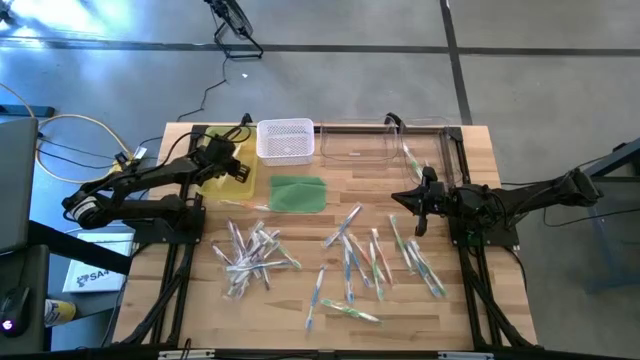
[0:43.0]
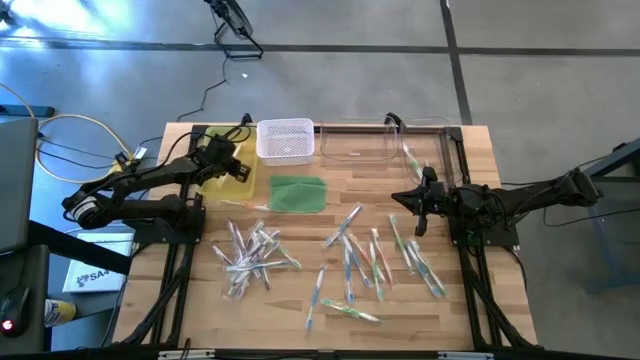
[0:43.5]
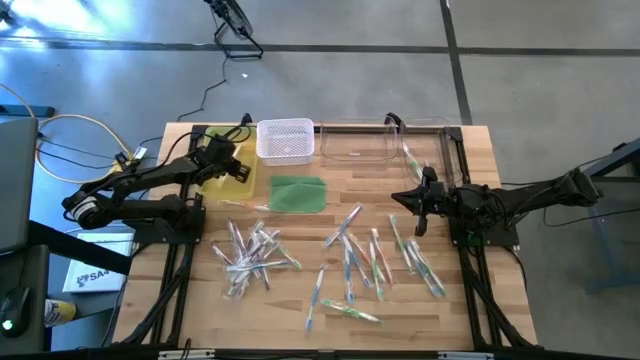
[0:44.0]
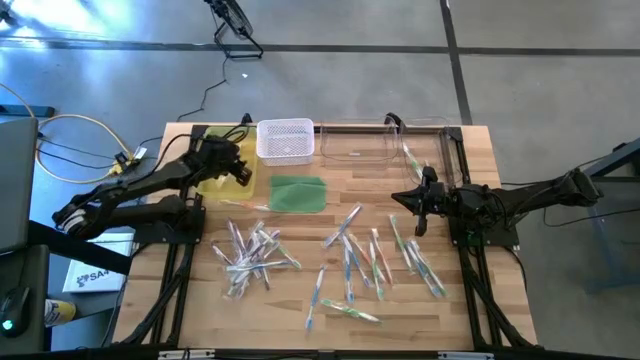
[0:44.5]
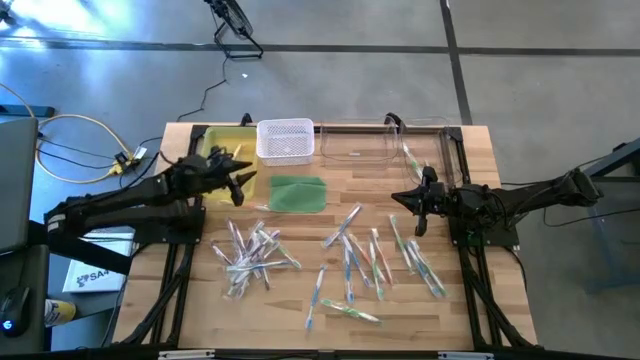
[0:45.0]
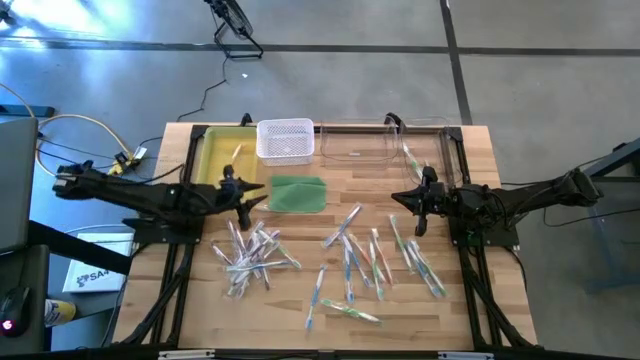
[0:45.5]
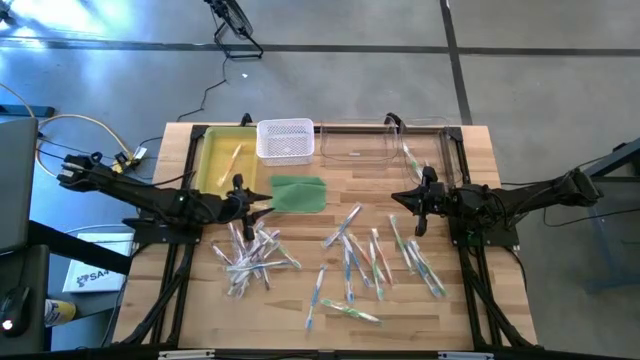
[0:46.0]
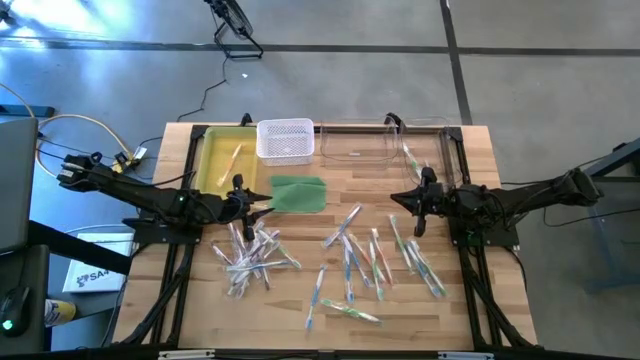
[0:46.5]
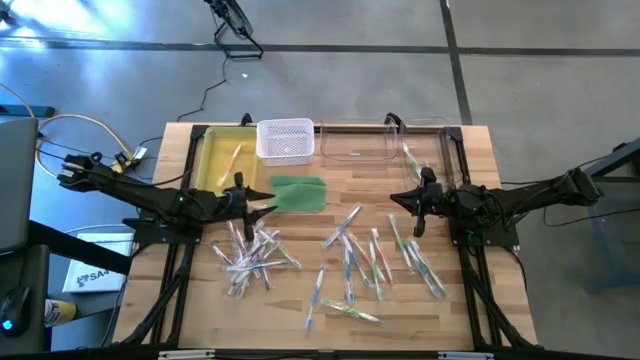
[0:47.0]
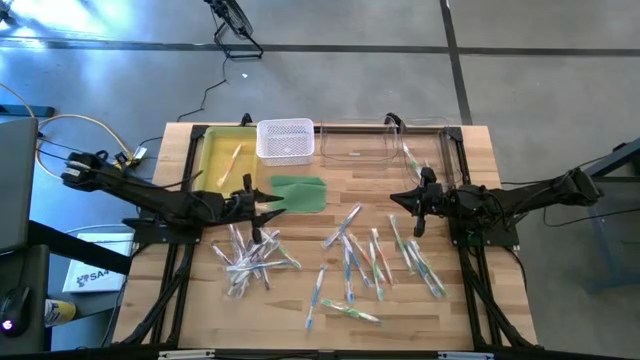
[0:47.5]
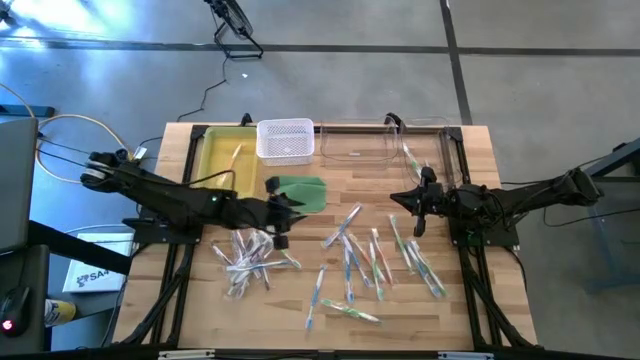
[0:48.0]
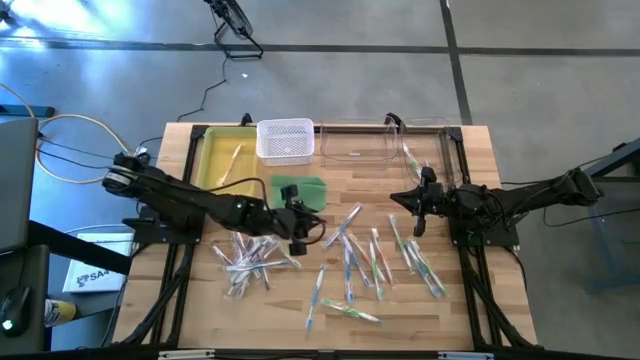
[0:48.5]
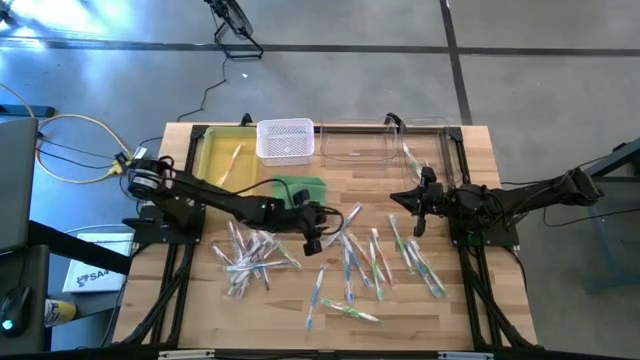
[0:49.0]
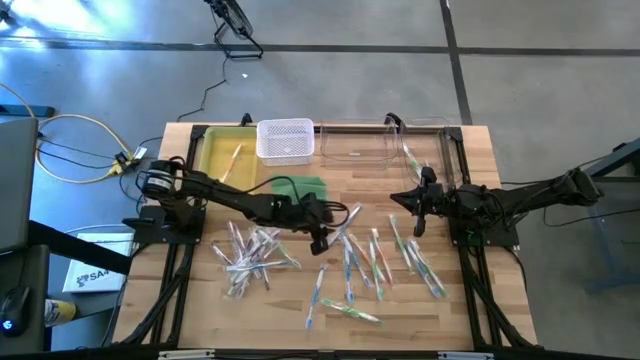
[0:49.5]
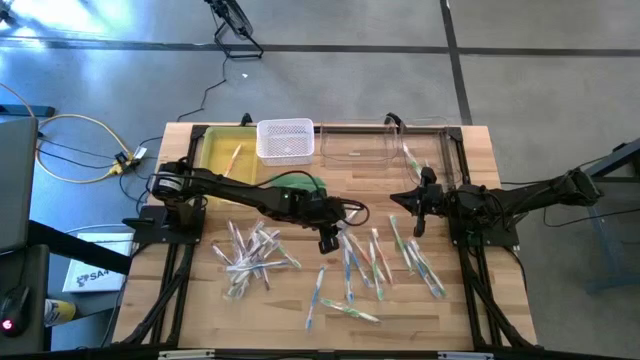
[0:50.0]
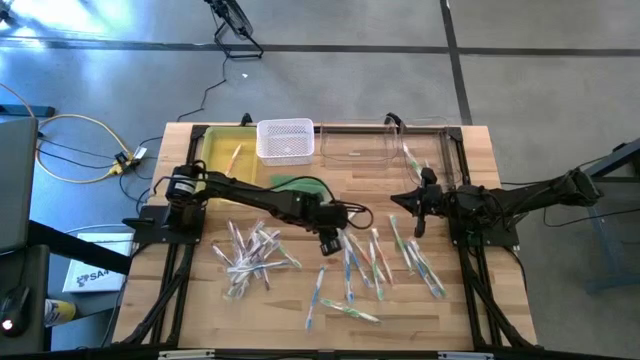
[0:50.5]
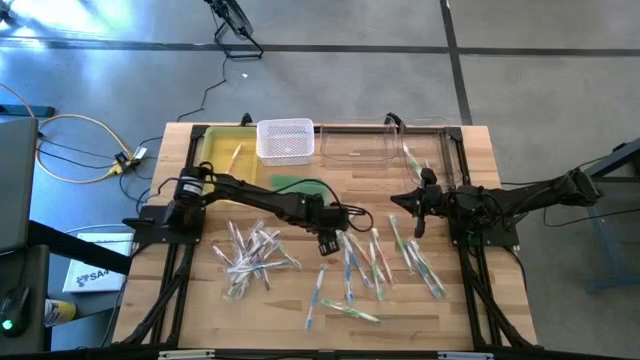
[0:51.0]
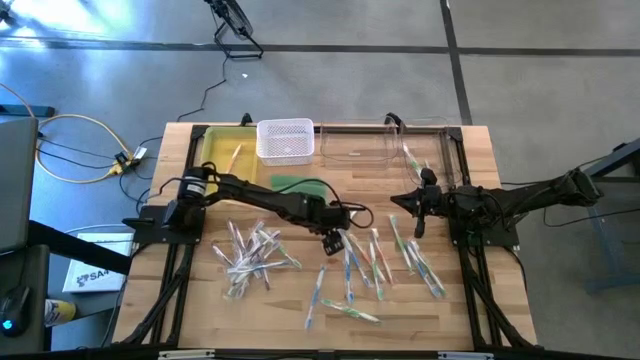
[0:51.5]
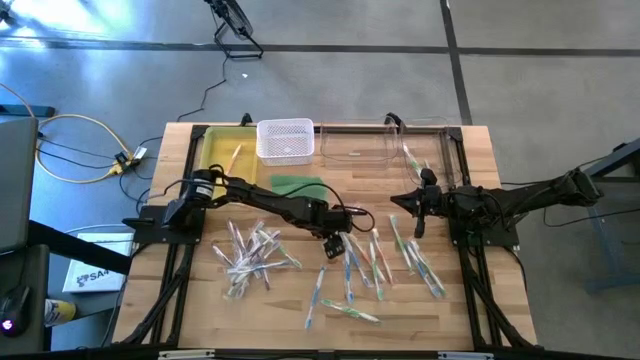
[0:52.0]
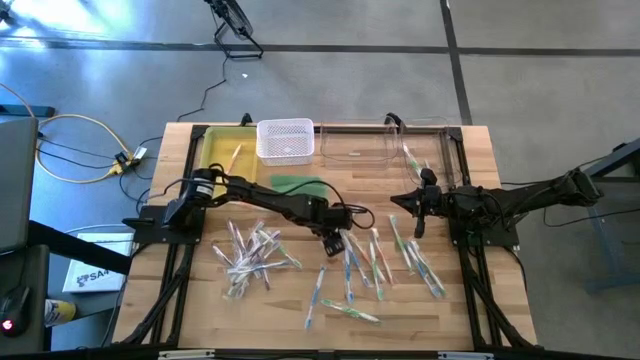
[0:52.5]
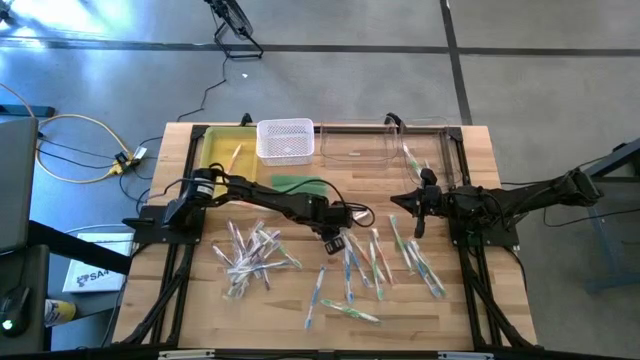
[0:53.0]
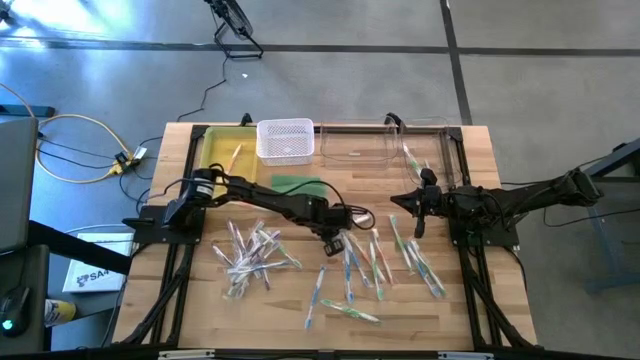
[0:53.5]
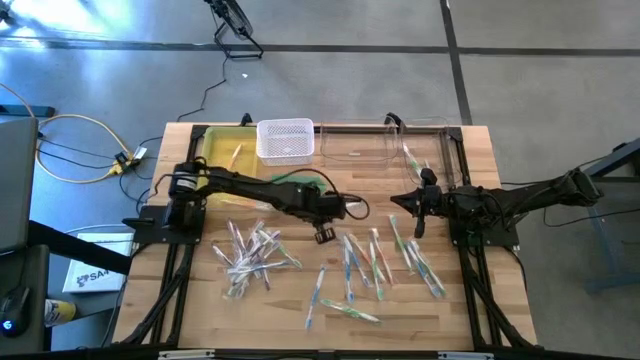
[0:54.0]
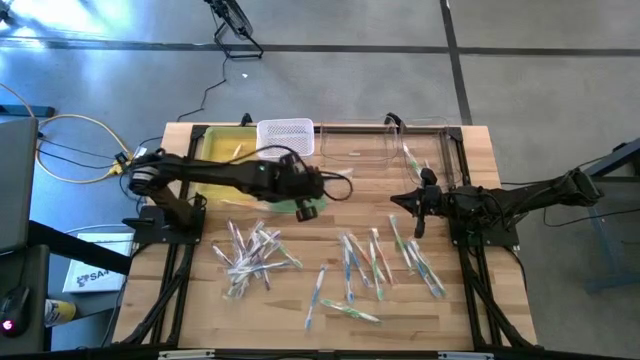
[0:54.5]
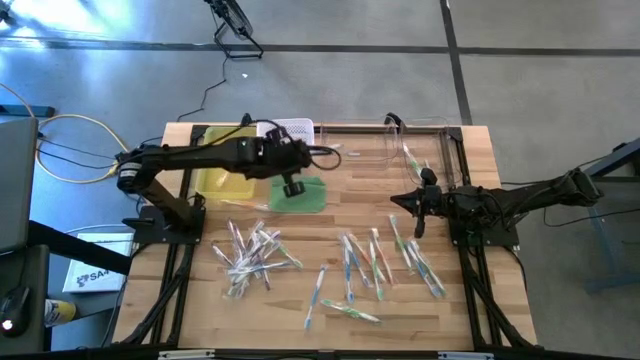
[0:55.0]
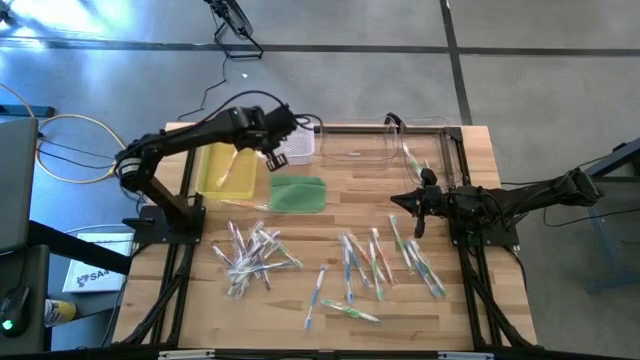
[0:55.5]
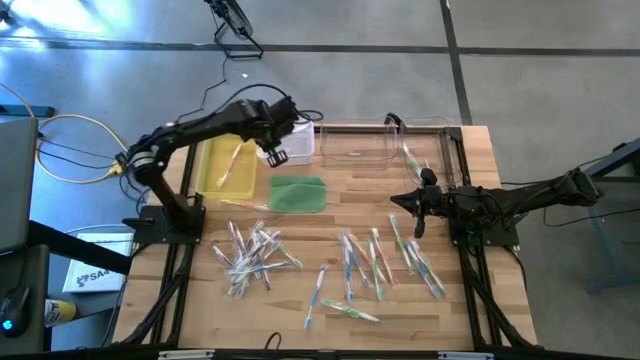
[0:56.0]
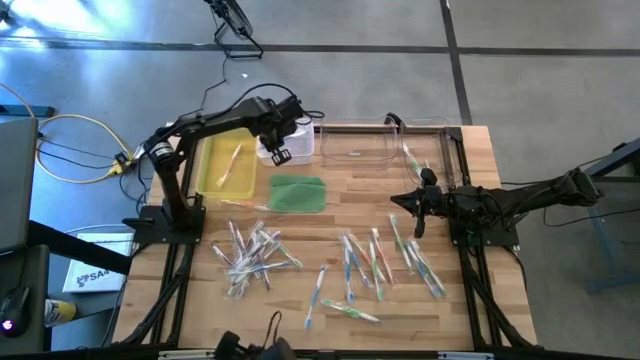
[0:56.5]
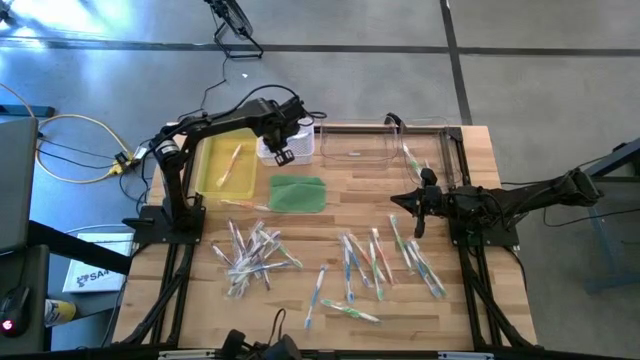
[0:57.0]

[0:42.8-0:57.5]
Task: Pick & Place Toothbrushes
Put the blue toothbrush into the white bin

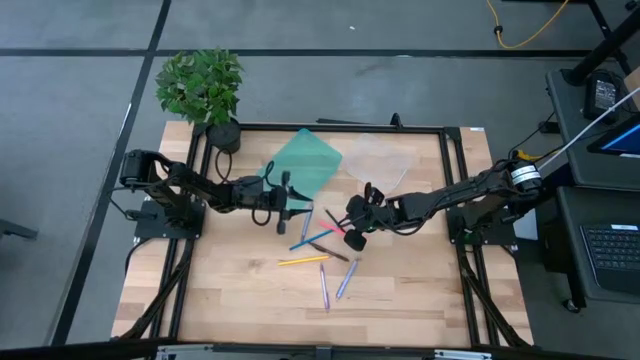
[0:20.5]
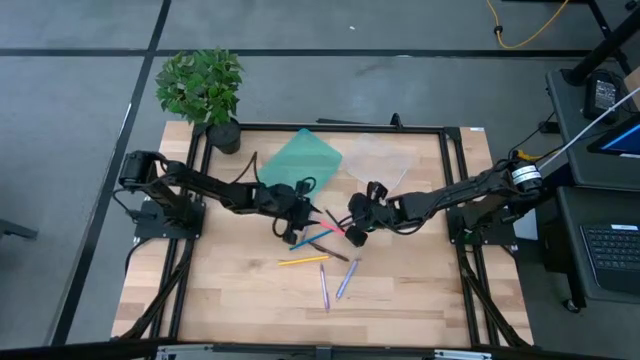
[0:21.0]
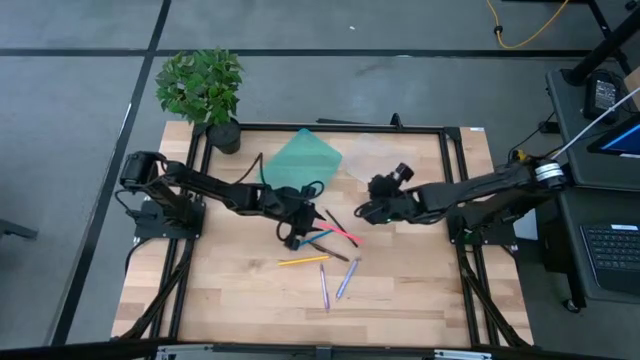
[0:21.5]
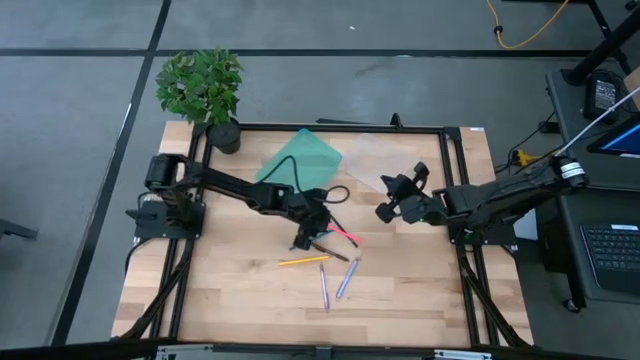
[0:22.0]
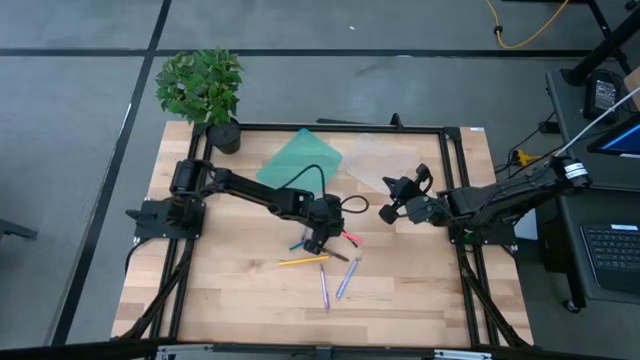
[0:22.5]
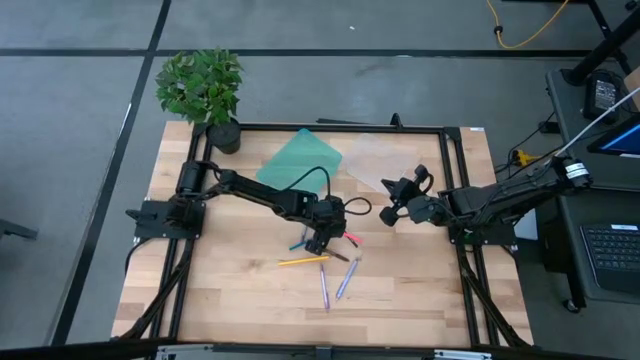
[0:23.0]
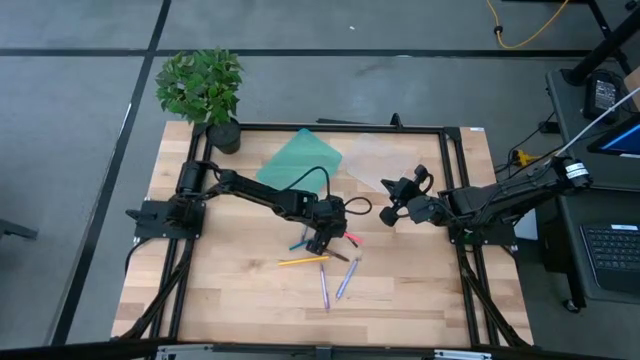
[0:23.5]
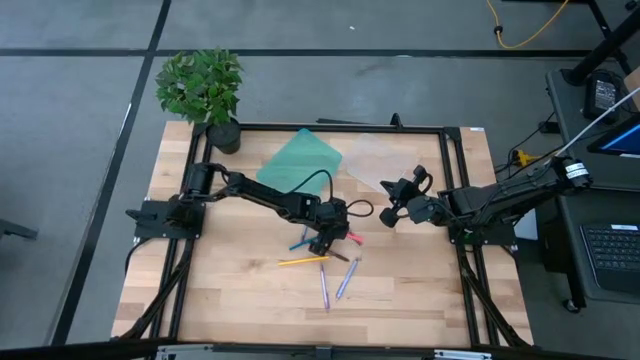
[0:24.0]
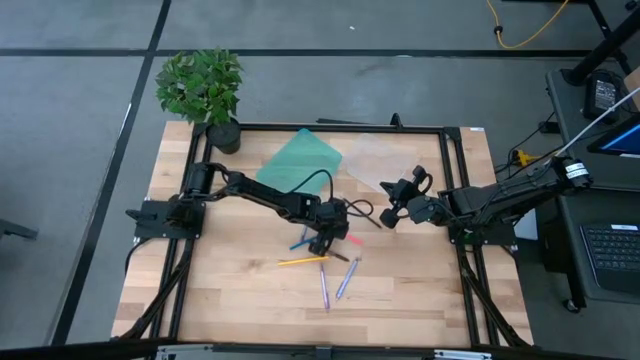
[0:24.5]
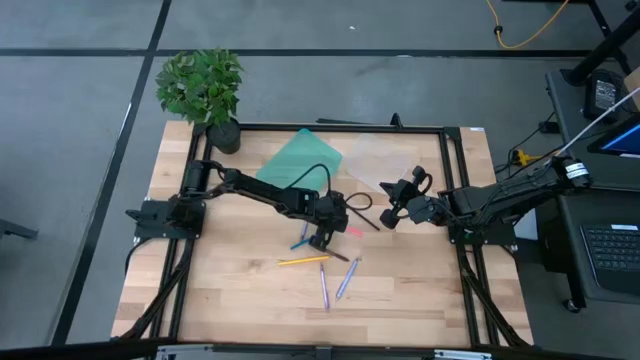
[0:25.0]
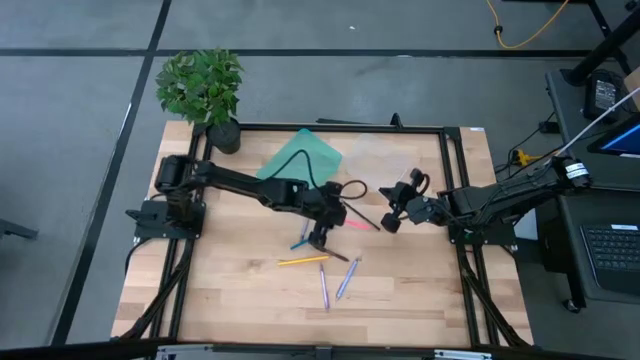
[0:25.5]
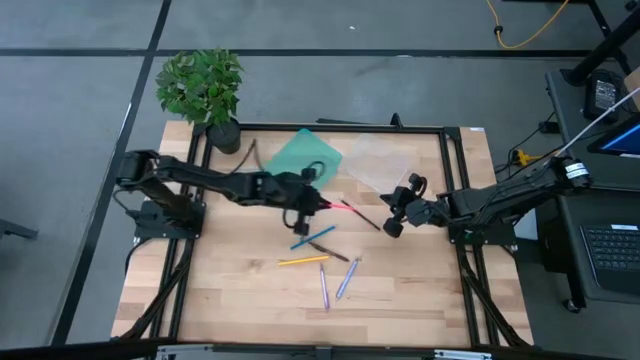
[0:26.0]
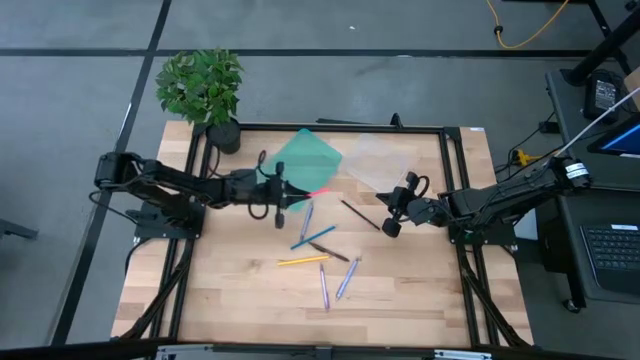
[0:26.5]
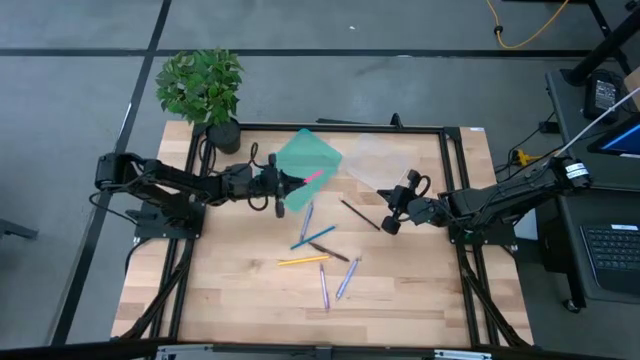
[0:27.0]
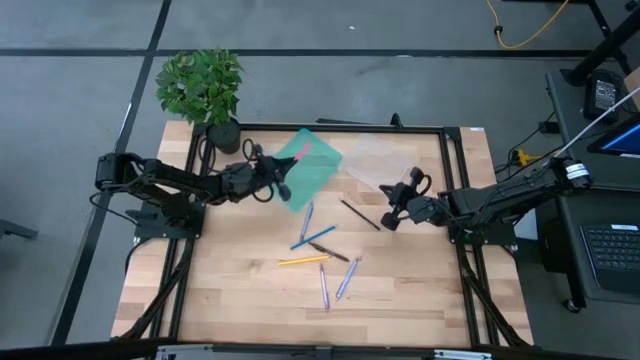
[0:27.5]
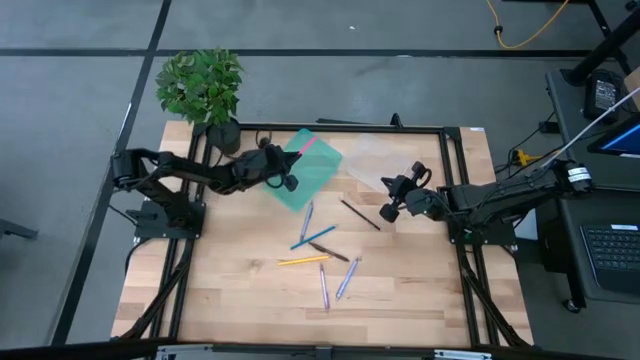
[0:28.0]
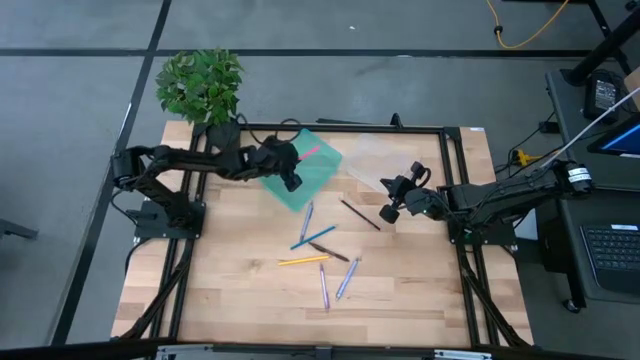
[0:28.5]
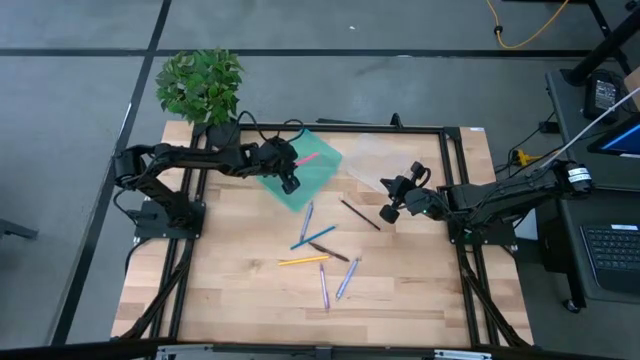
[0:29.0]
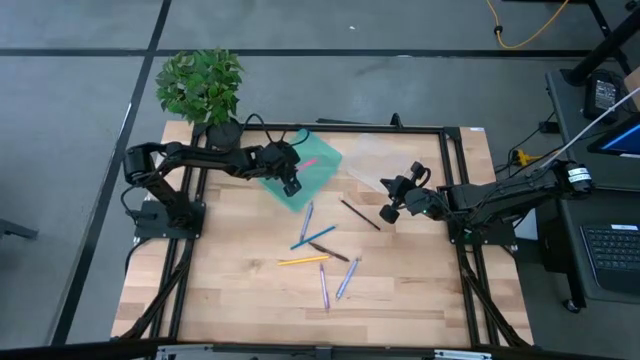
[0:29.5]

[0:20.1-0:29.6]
Task: Sort pens & pencils
Put the pink pencil into the blue bin
